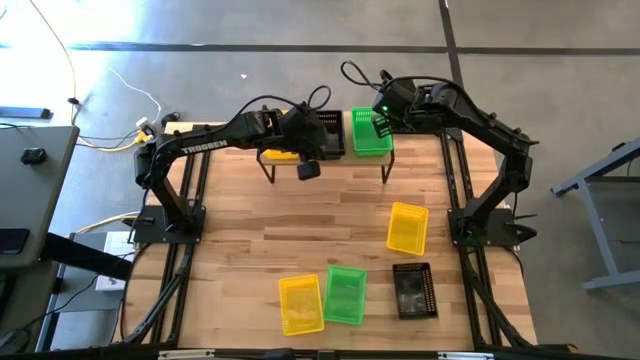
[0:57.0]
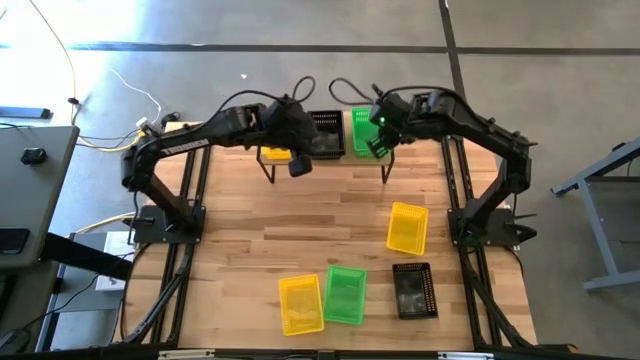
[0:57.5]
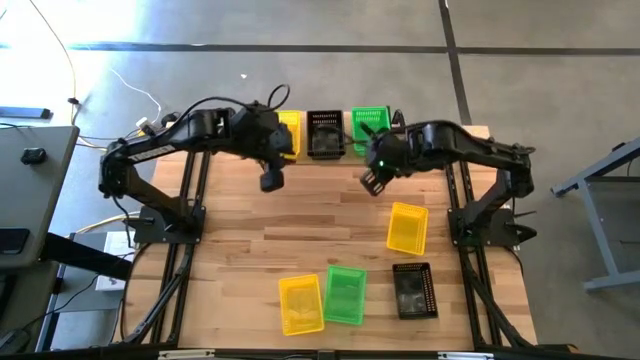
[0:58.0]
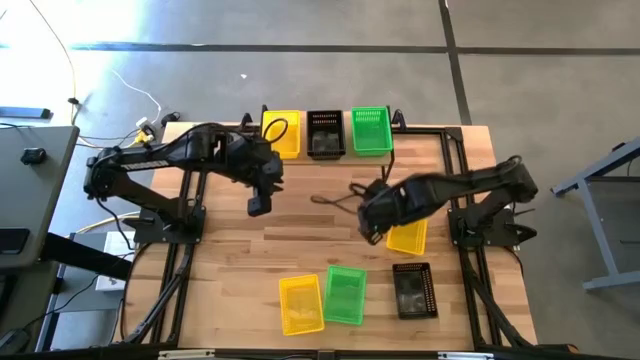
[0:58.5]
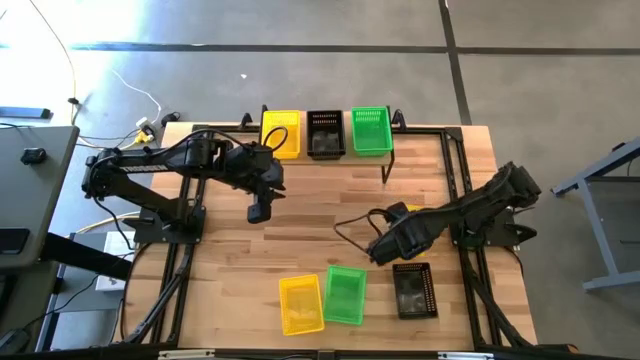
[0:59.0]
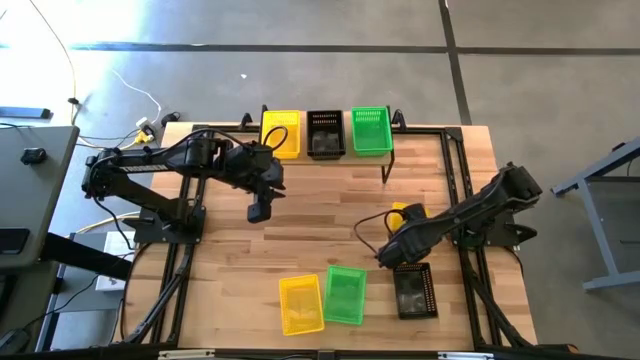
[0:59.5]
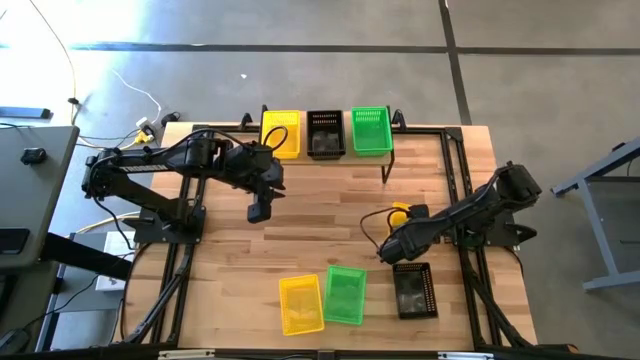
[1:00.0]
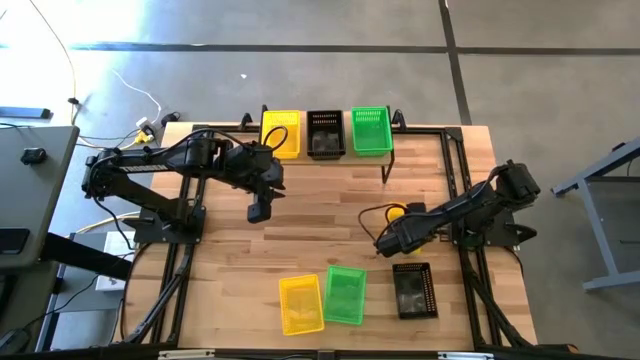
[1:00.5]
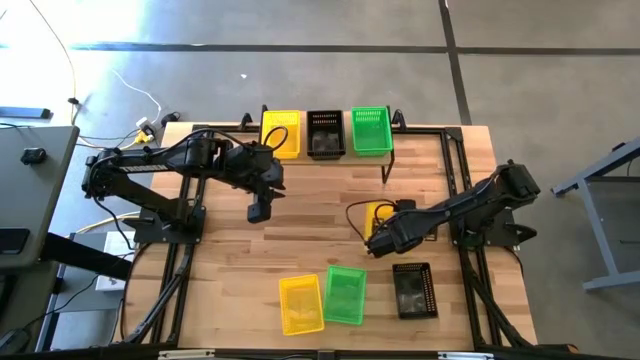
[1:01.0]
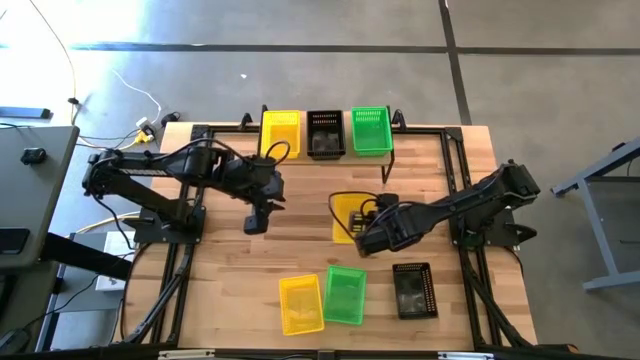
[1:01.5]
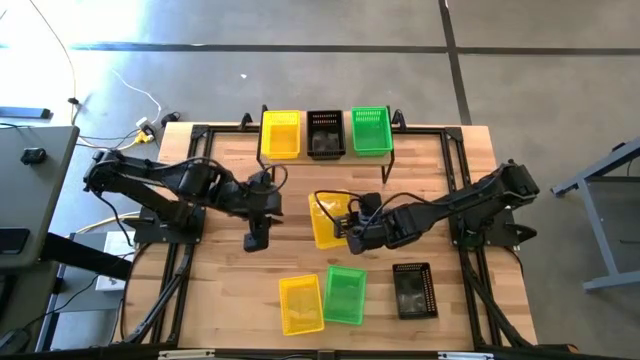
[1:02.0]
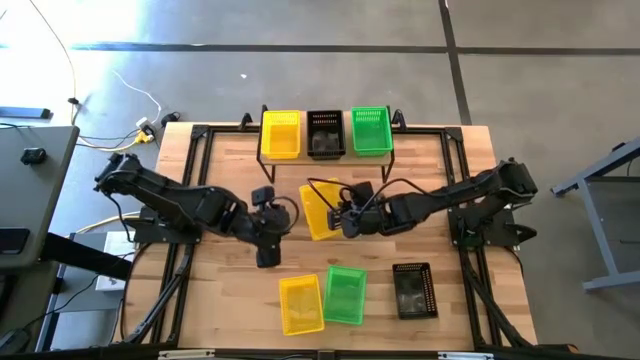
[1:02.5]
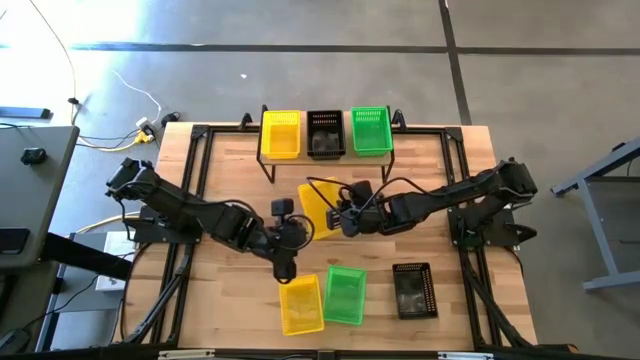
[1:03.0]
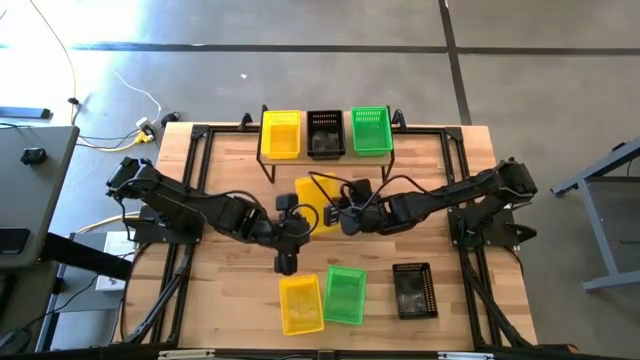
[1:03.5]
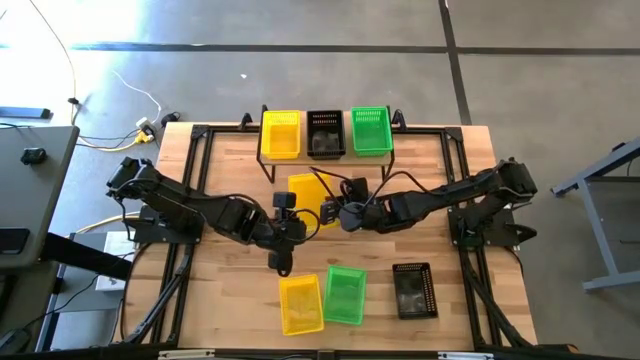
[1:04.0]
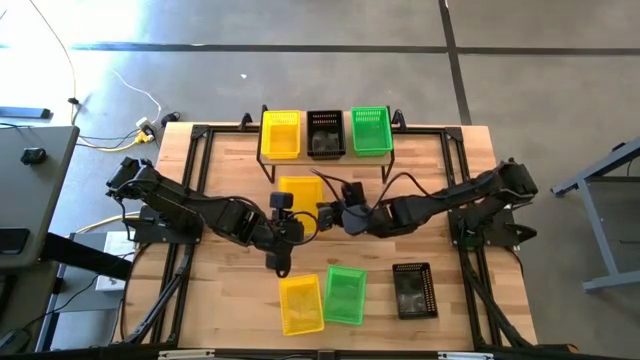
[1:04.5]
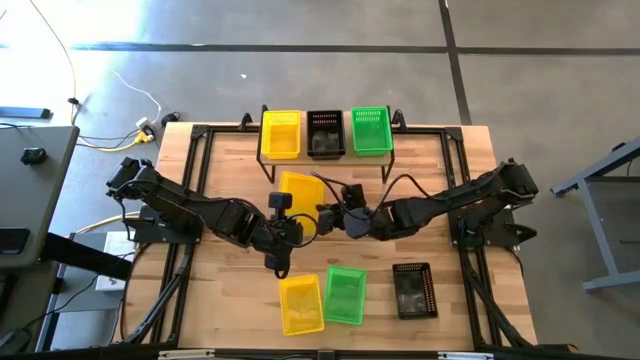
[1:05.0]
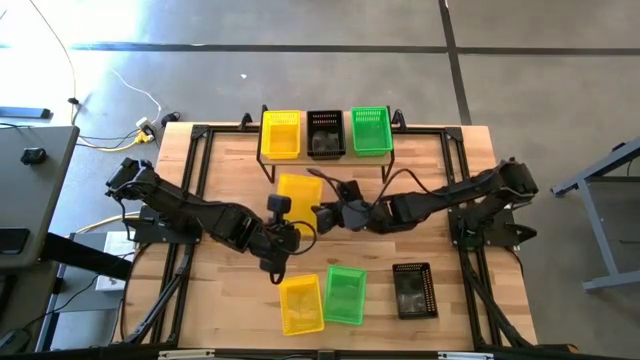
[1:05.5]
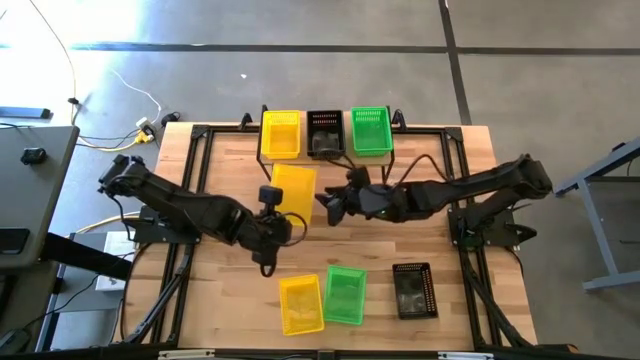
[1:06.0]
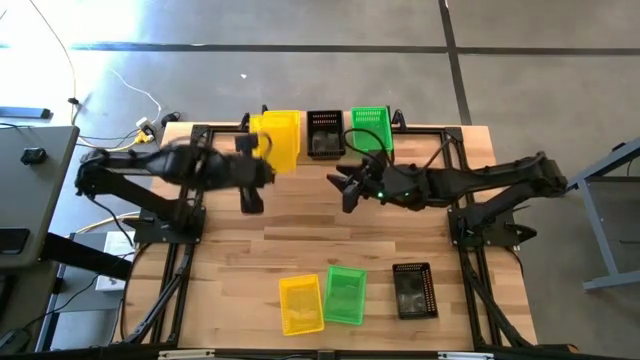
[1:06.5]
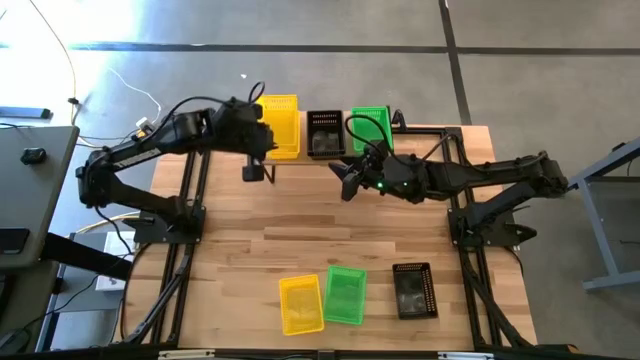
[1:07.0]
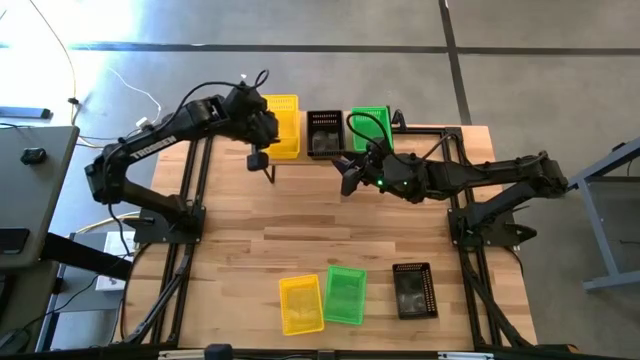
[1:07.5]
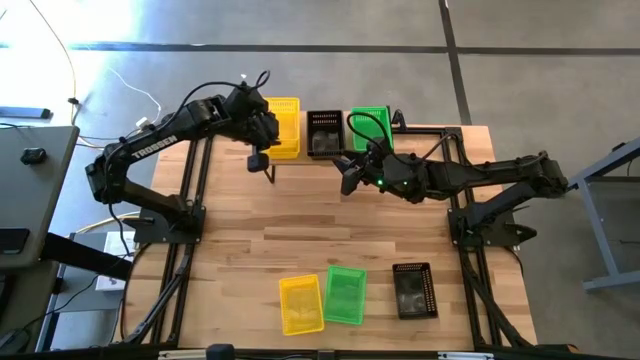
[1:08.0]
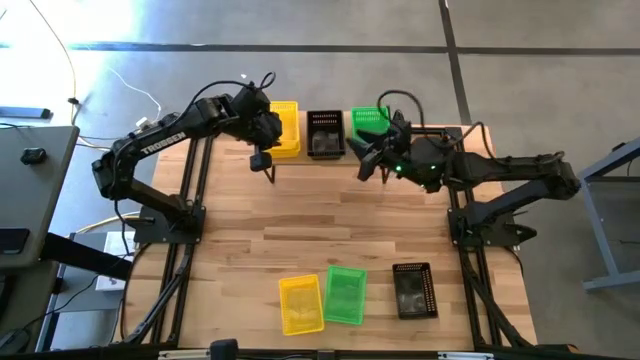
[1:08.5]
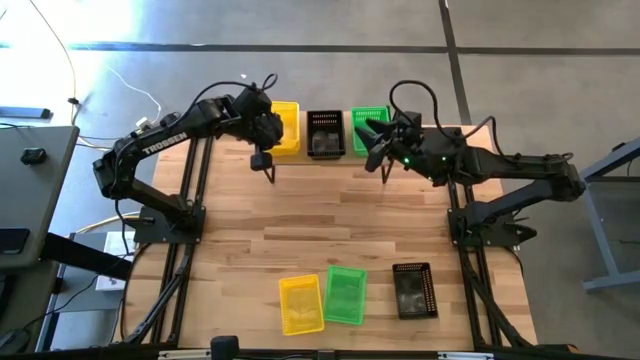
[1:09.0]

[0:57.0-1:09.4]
Task: Stack baskets on shelf by color
Stack the top yellow bin on the yellow bin on the shelf

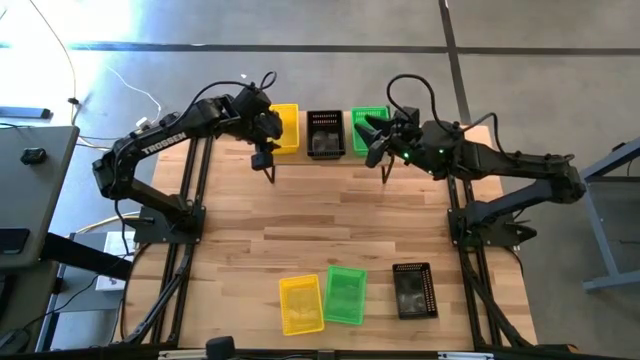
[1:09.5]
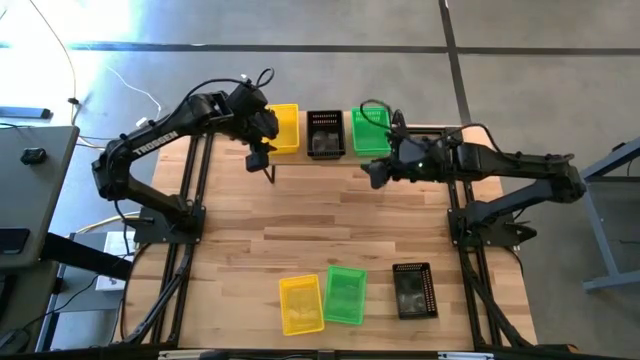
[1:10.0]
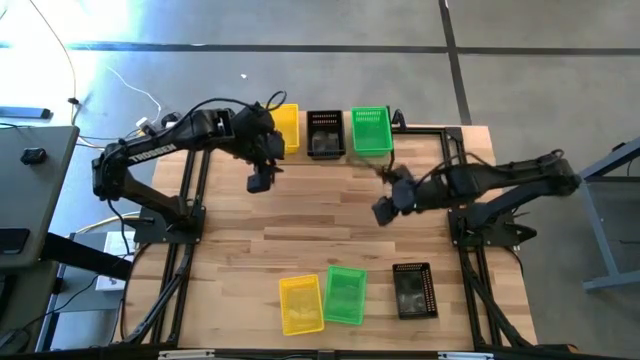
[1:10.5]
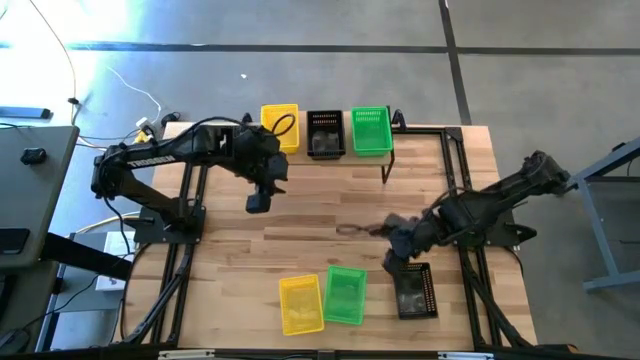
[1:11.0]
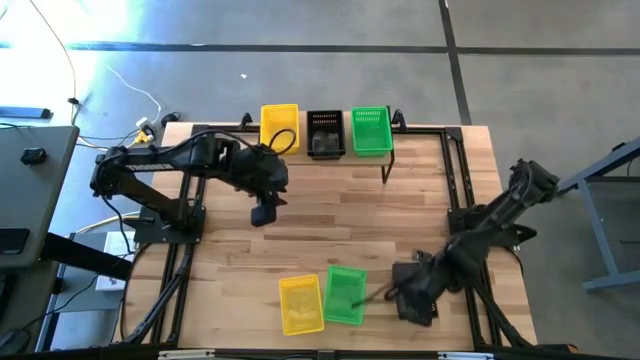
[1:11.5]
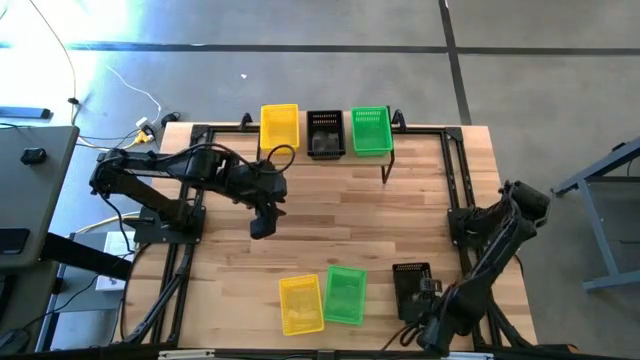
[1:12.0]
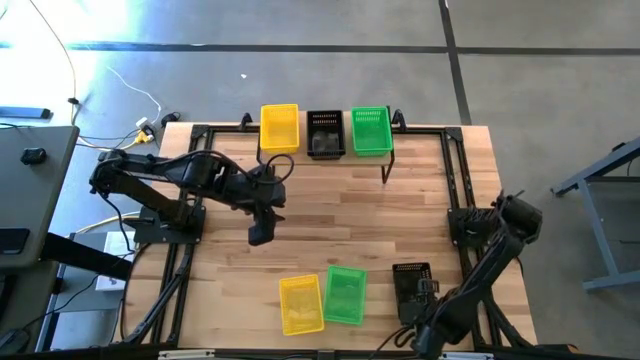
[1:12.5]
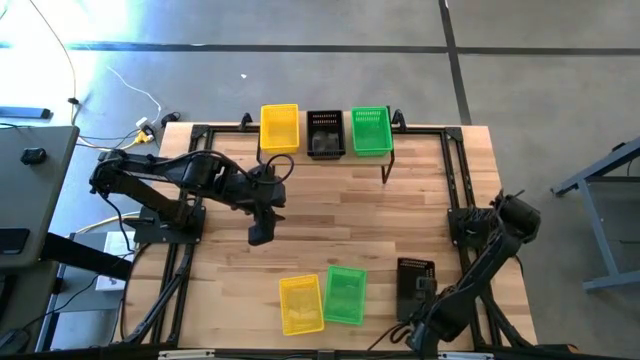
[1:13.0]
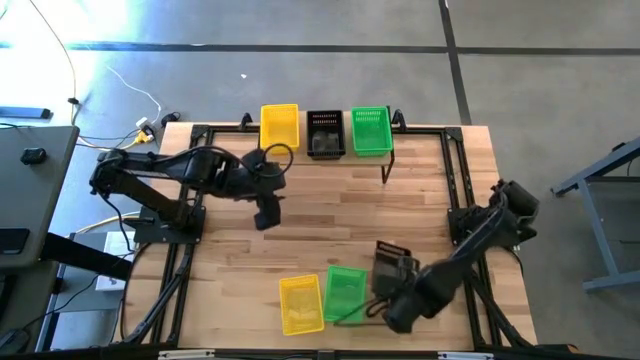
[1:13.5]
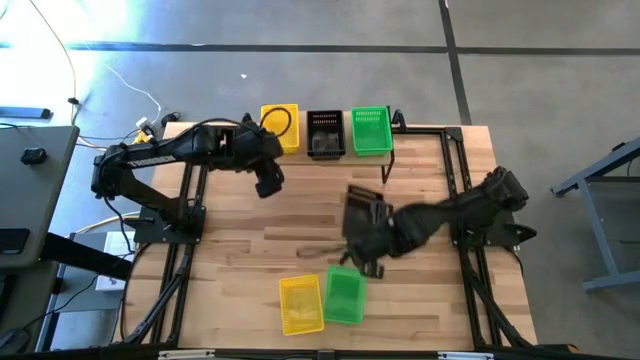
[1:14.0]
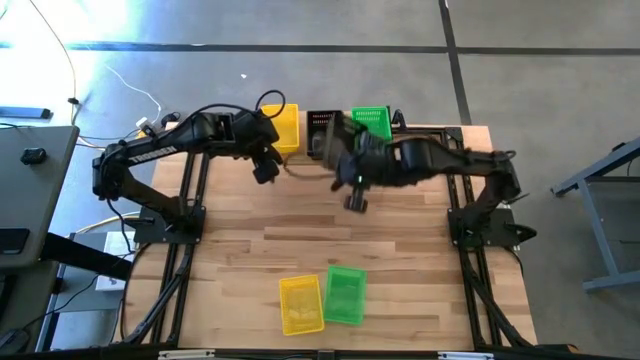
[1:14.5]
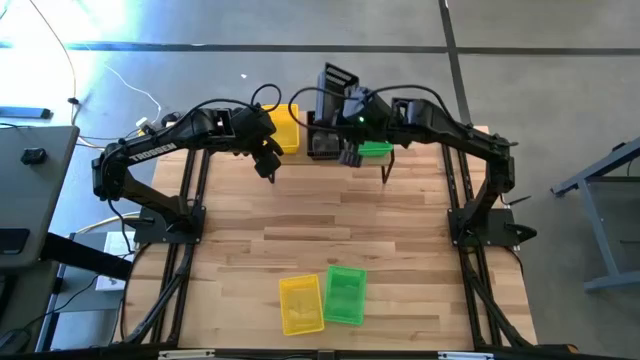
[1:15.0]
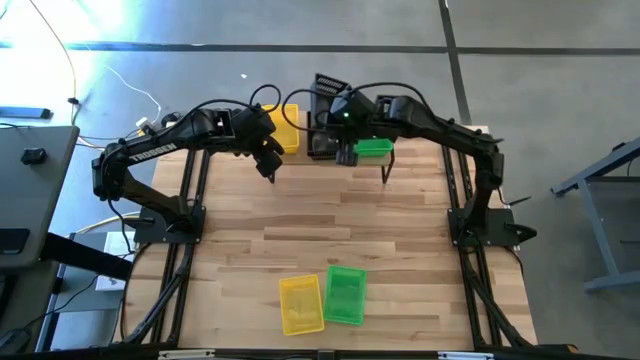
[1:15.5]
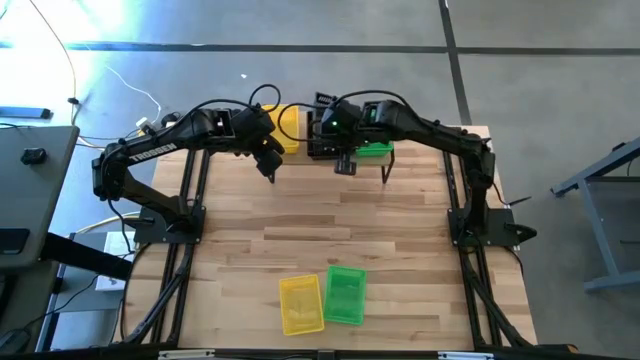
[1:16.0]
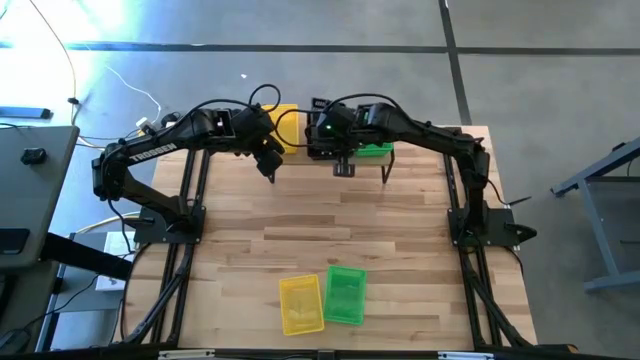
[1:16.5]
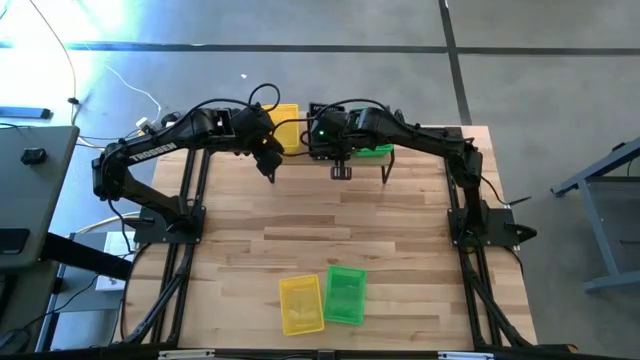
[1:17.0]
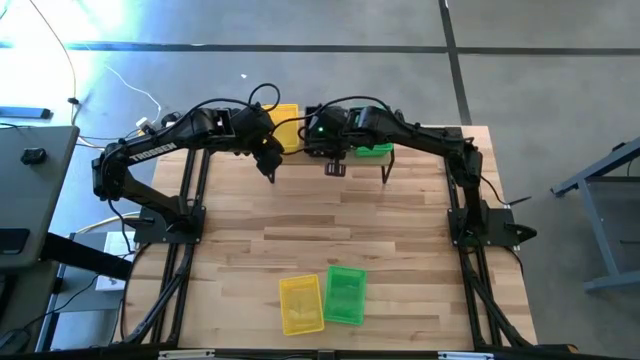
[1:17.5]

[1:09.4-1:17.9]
Stack the black bin on the black bin on the shelf
